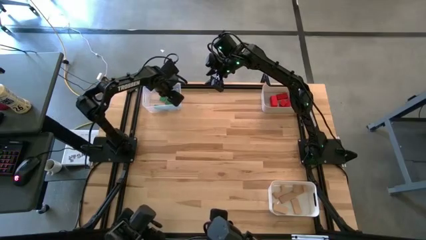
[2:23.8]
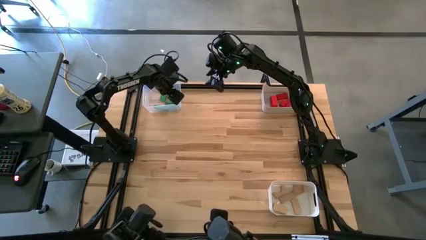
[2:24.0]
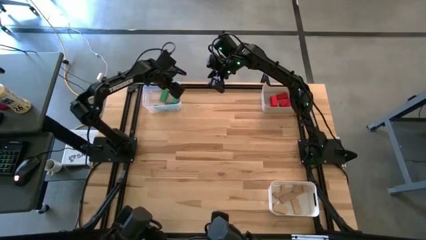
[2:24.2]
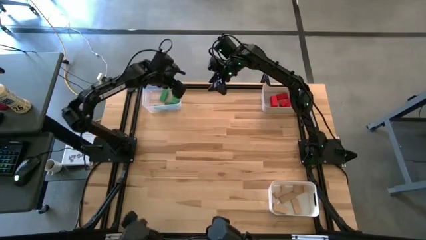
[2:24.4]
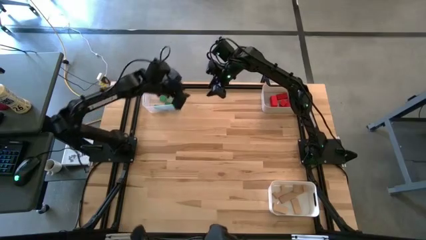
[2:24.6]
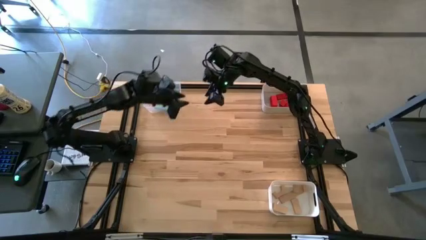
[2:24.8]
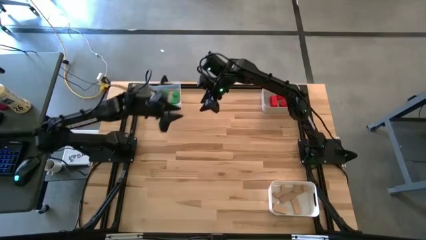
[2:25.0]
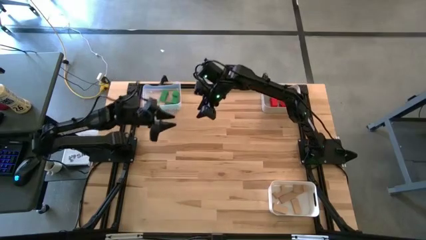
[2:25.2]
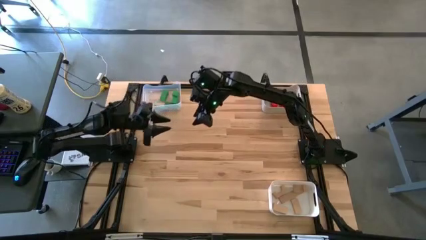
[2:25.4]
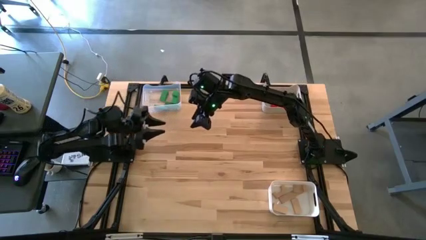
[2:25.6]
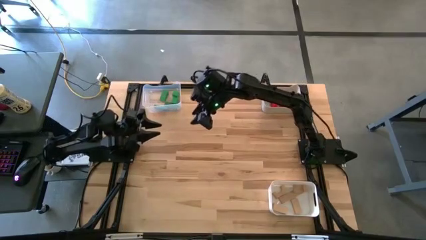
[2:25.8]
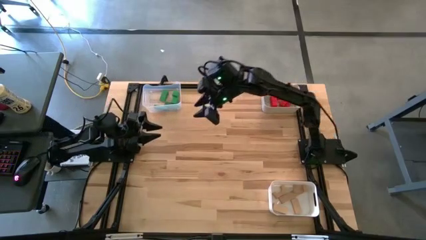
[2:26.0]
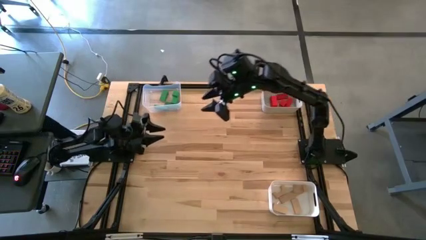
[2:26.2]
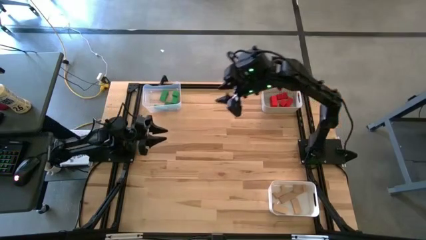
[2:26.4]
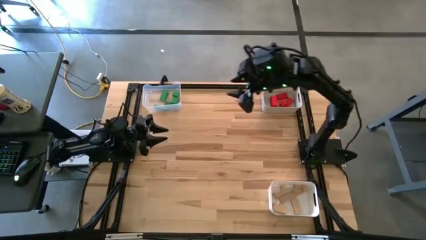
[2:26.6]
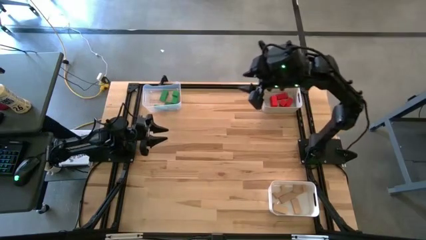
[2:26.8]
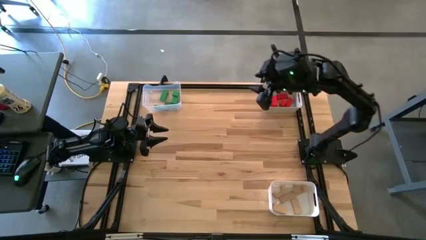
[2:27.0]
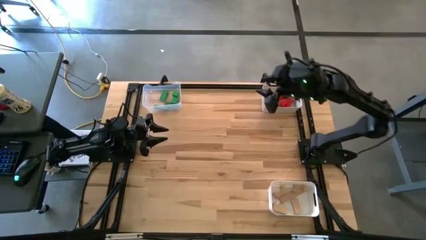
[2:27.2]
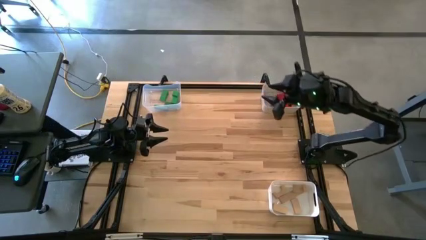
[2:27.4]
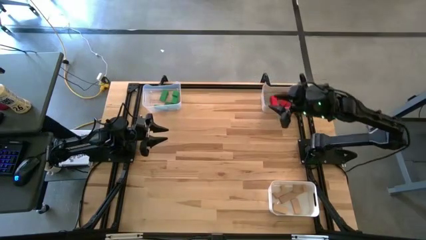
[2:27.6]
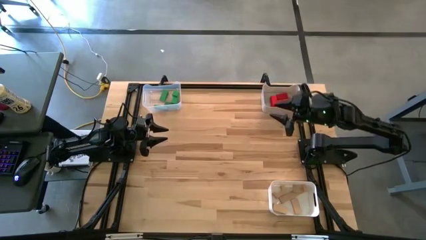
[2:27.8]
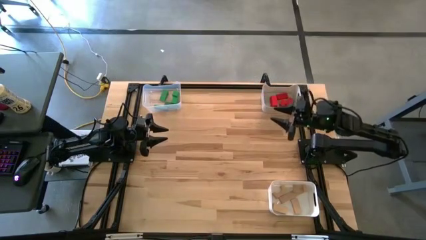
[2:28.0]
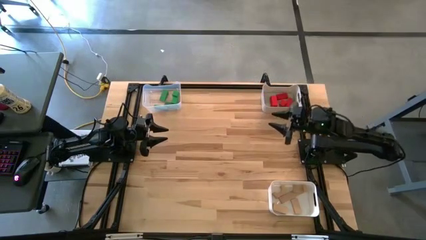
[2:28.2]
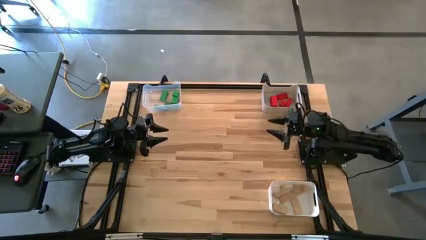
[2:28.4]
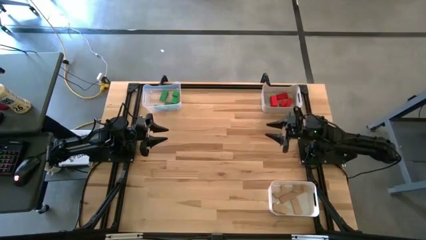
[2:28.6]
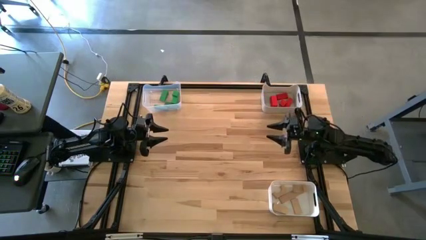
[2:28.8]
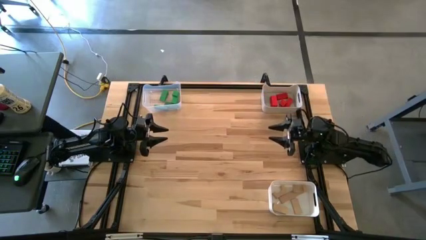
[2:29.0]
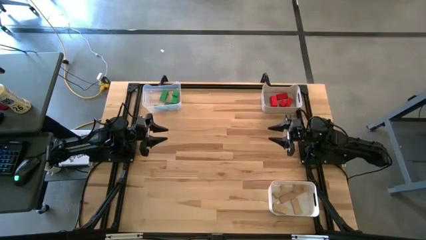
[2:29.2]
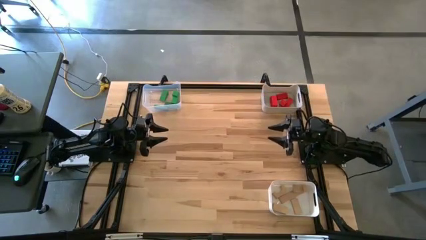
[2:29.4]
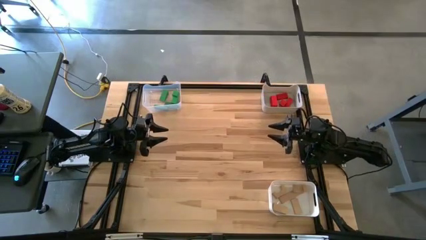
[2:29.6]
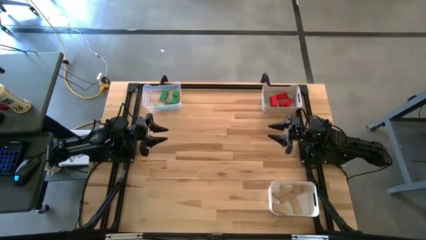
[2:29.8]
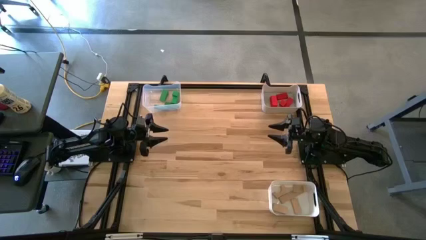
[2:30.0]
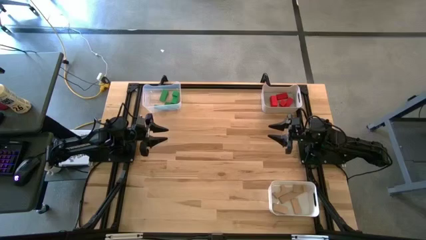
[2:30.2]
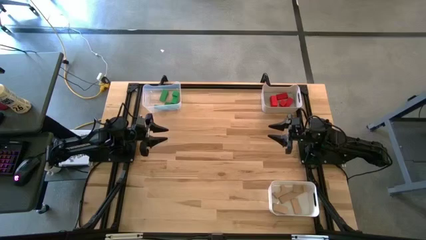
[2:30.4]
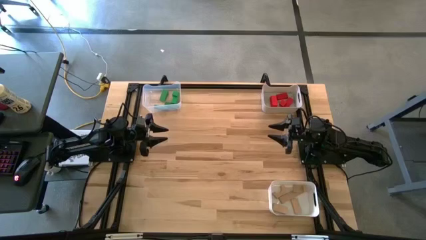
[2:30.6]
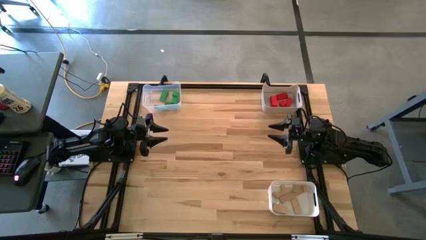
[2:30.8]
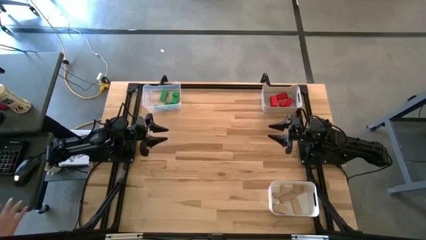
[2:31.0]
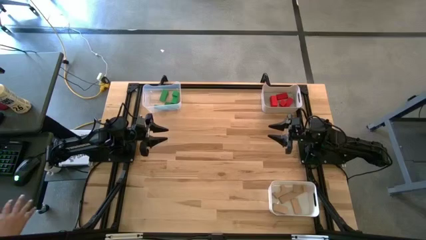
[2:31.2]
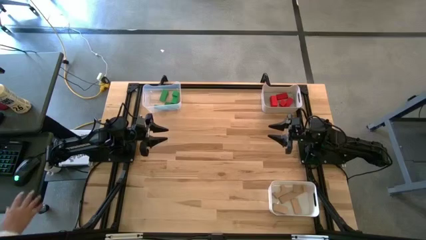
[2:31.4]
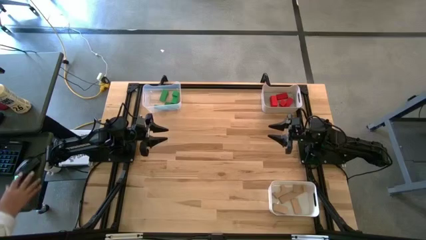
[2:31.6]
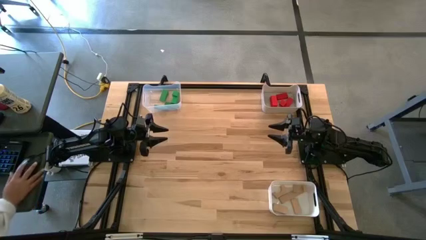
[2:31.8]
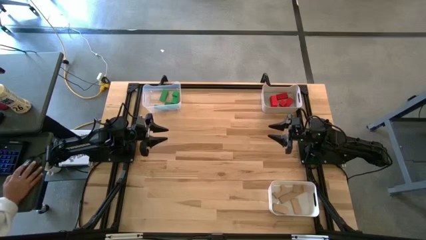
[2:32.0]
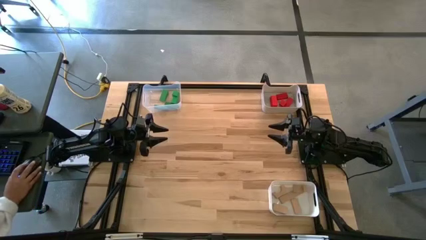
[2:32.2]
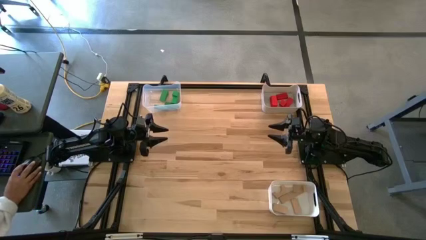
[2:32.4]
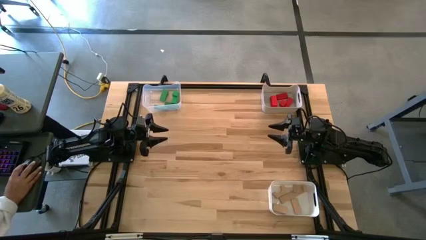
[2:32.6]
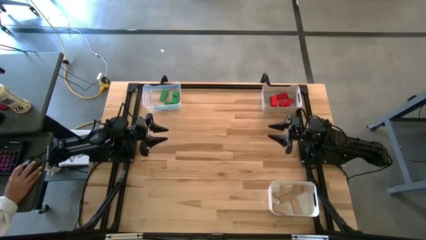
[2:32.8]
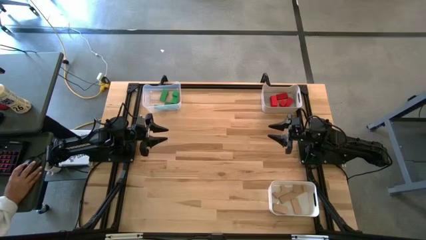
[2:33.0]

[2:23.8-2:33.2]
Task: Sort & place blocks by color
Return to Home Position

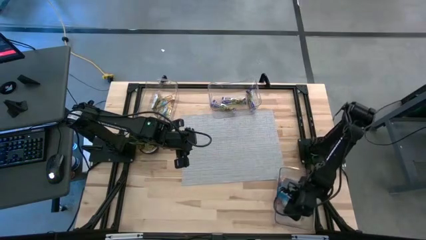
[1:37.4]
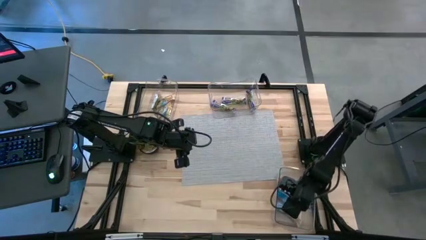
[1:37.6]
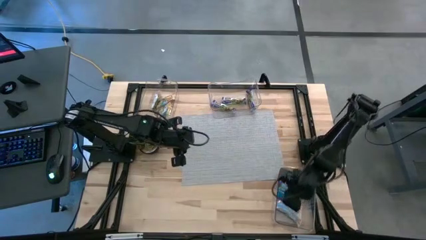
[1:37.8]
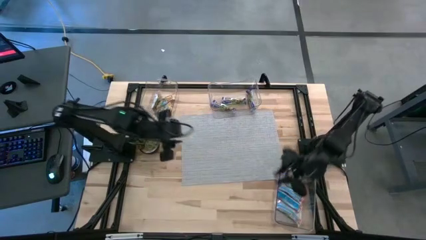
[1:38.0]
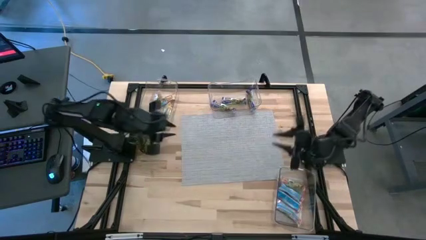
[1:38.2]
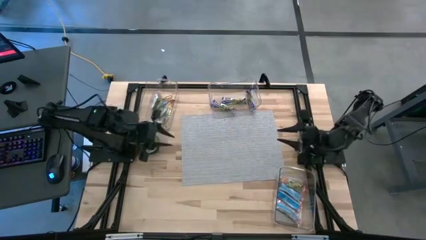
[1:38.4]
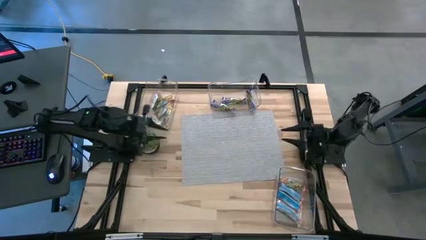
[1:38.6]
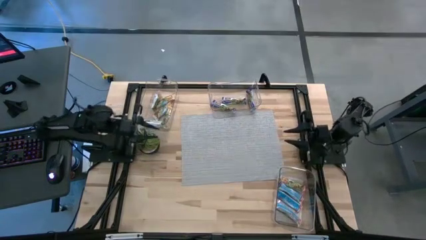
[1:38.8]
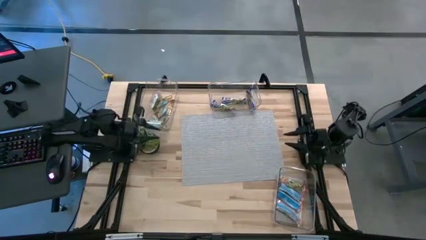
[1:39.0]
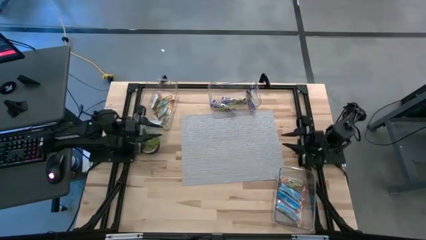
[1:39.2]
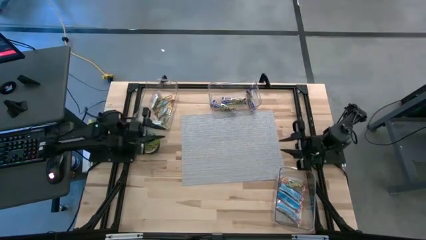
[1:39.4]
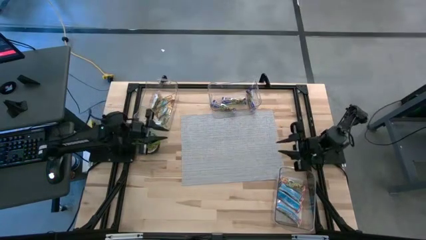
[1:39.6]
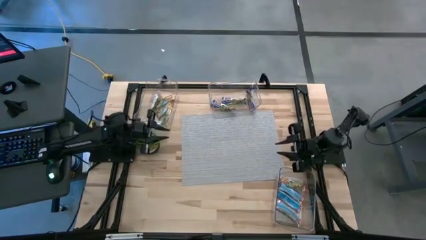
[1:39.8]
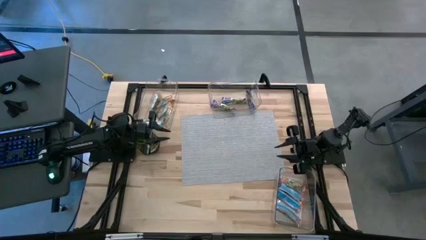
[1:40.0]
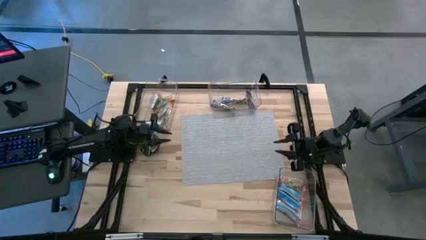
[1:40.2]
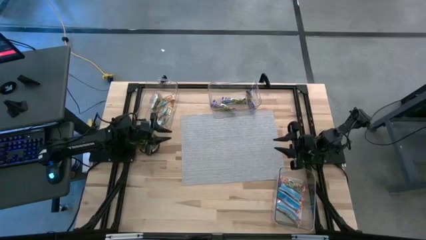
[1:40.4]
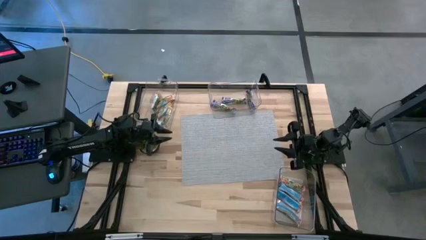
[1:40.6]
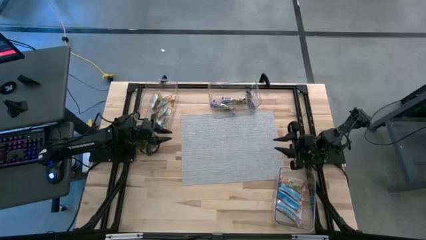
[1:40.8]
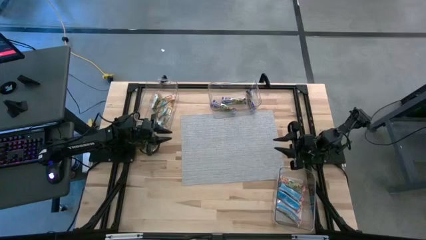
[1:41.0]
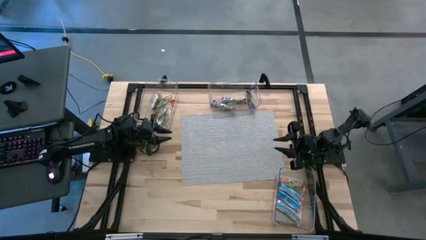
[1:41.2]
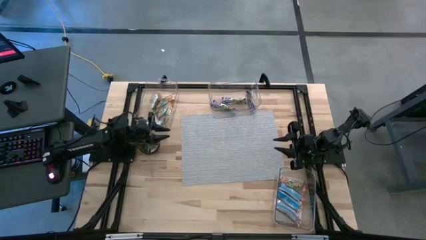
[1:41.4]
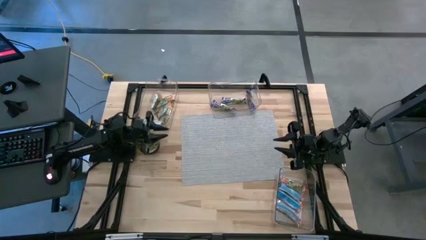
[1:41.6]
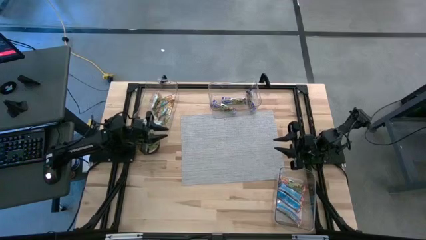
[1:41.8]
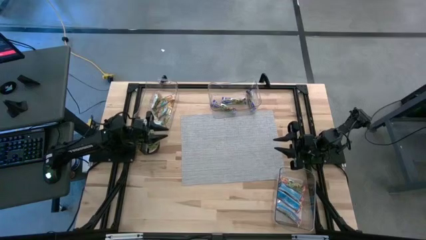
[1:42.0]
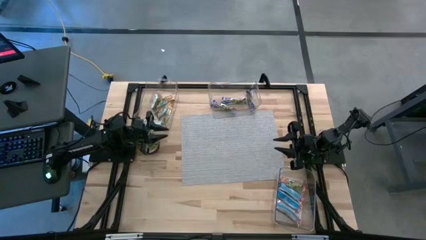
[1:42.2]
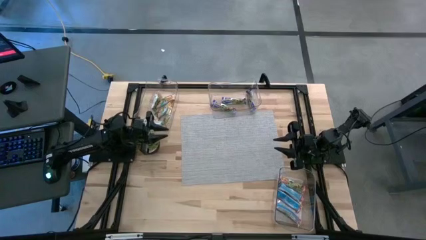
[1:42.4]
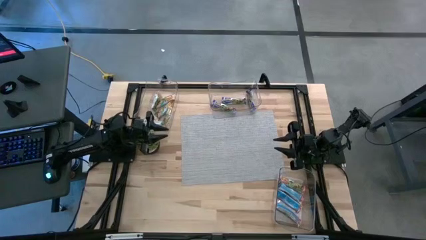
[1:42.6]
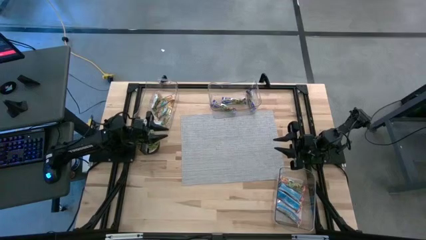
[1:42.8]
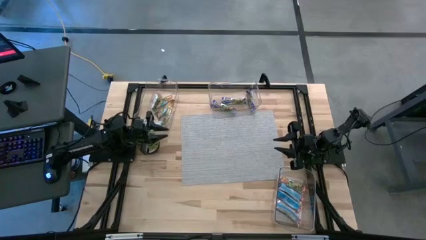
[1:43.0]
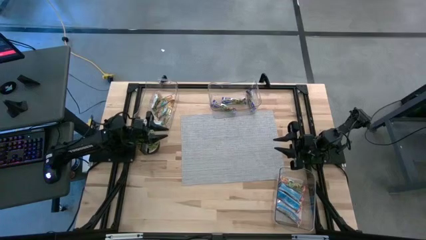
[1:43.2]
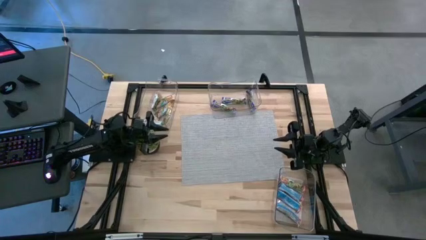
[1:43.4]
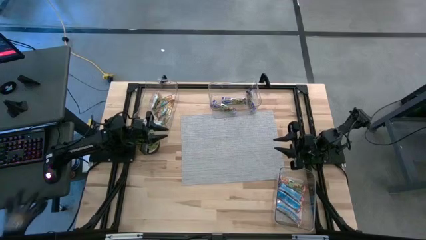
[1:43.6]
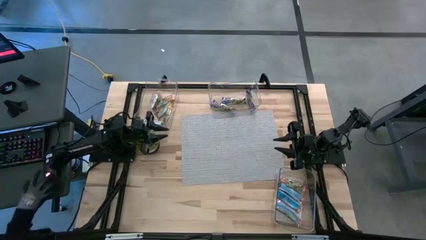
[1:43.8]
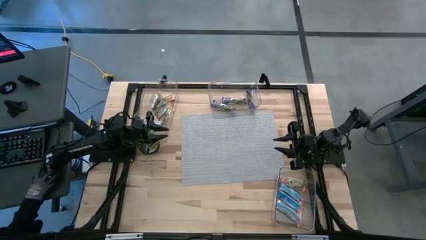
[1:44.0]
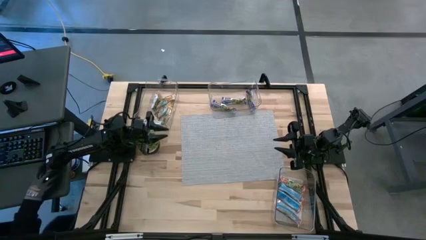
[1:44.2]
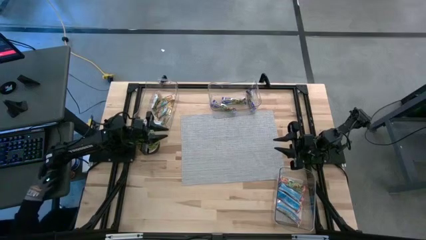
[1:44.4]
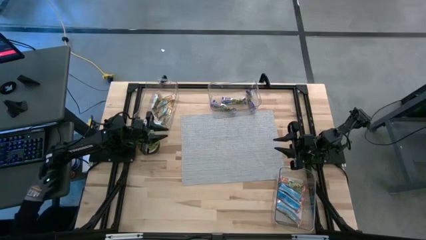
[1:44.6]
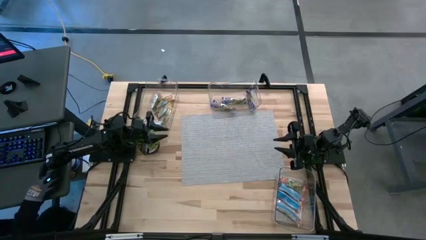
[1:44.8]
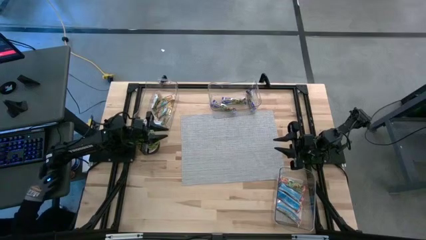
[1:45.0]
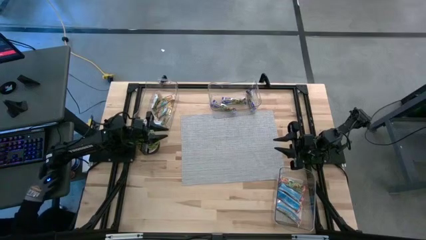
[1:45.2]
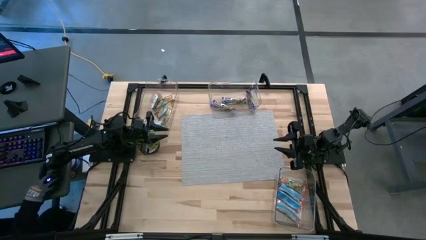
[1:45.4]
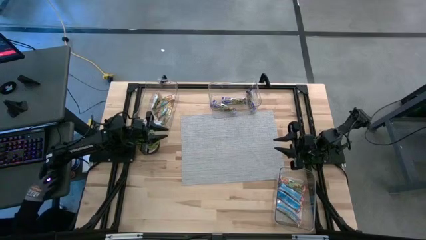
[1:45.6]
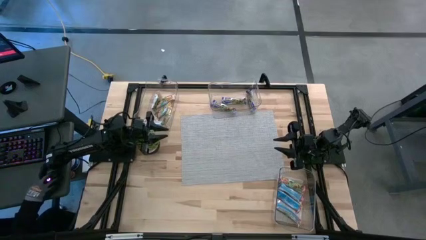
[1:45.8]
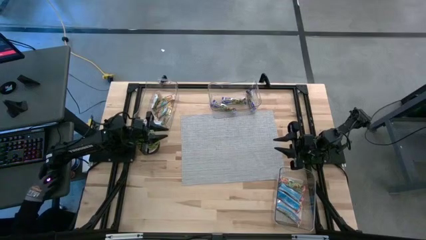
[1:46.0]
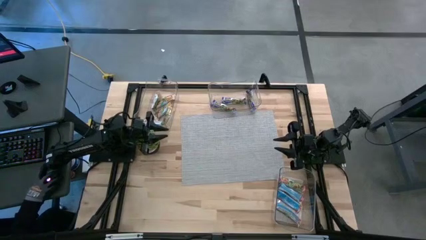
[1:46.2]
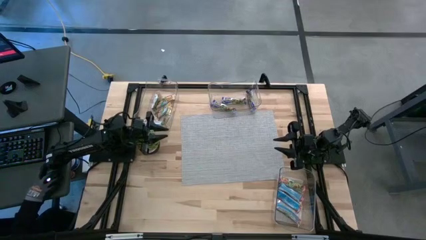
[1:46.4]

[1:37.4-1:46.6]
Task: Pick and place Granola Bars by type
Return to Home Position
